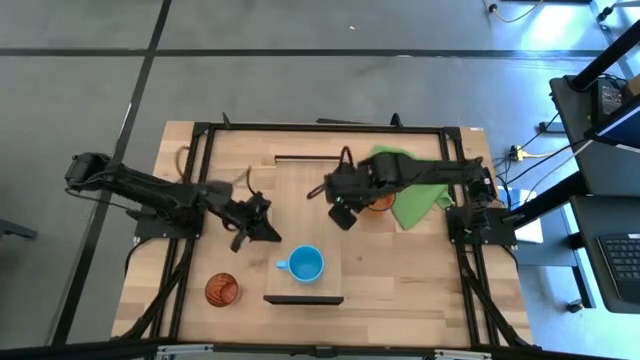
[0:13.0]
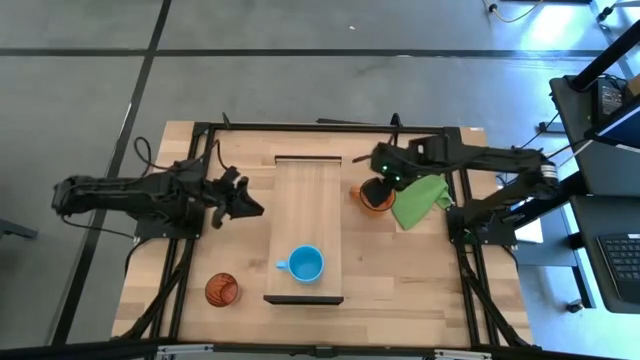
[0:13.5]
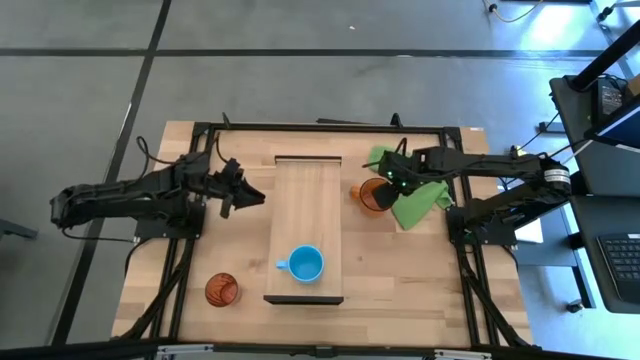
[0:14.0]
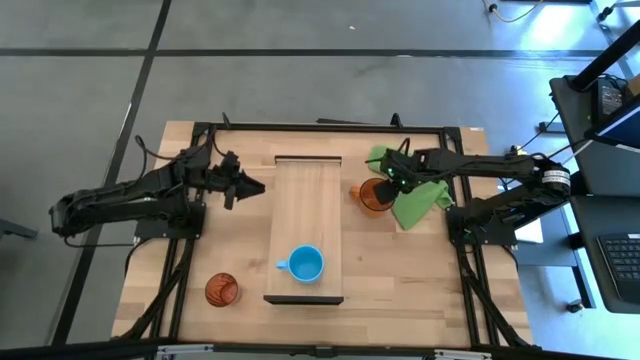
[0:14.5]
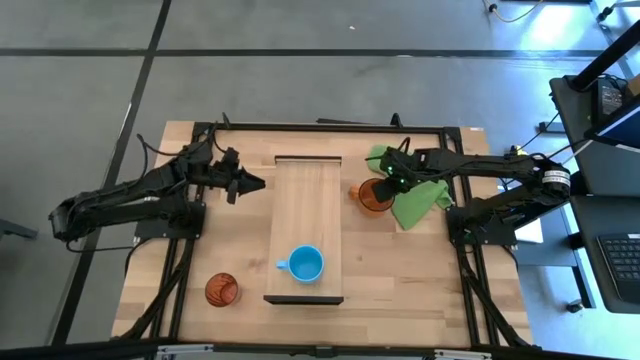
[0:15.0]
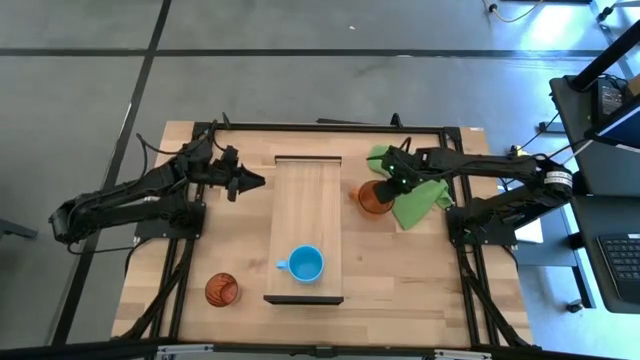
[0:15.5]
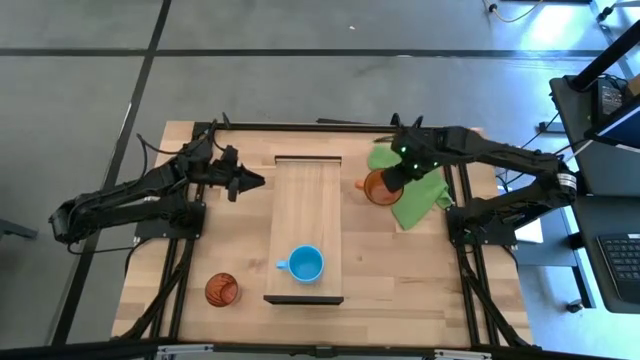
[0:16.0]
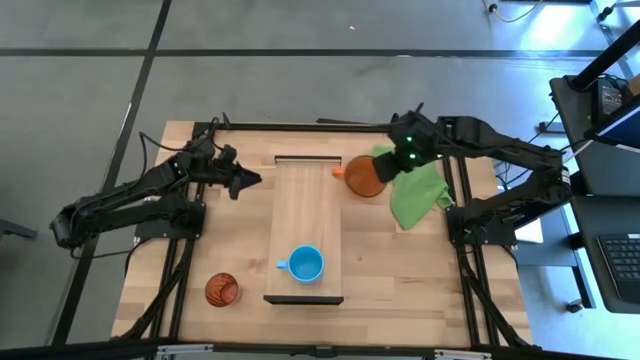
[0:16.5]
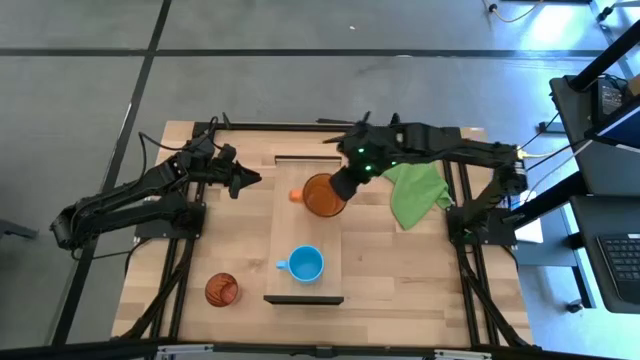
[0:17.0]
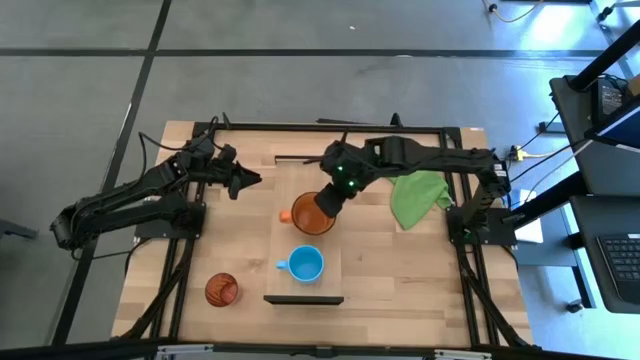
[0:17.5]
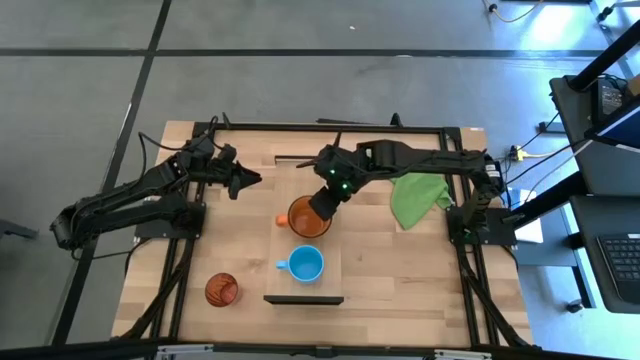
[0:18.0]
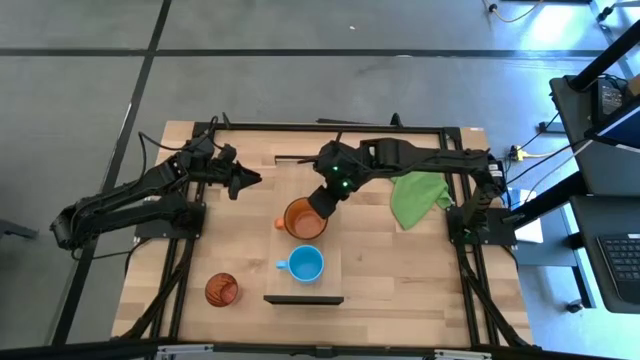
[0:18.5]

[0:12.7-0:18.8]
Task: Stack small to large cups/mugs on shelf
Put the orange mug on the shelf

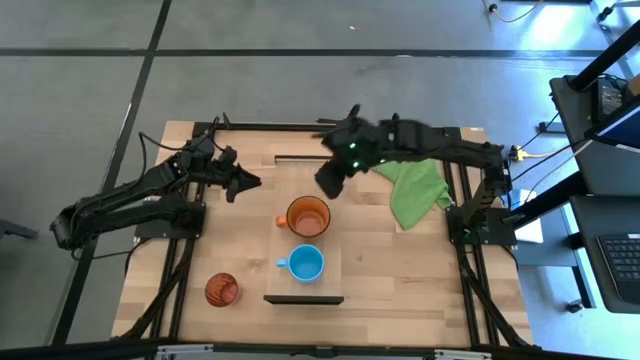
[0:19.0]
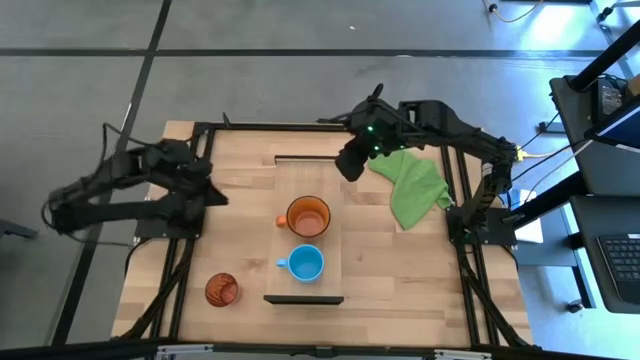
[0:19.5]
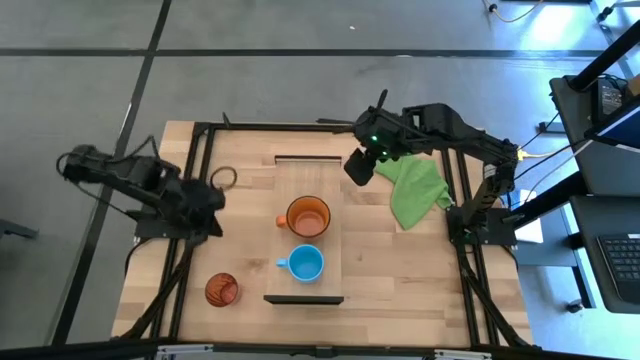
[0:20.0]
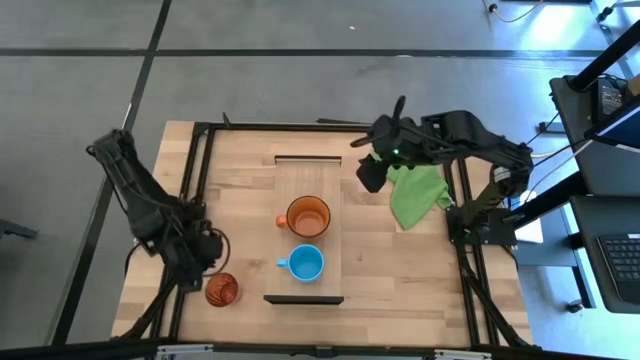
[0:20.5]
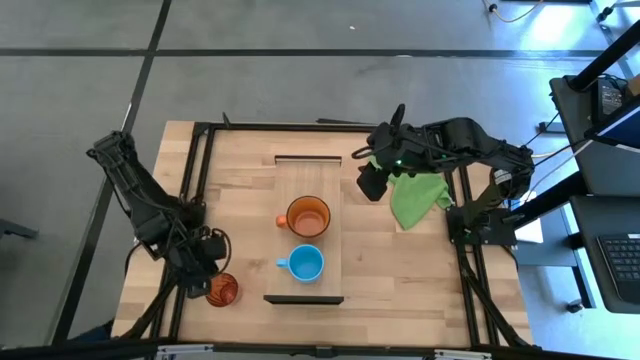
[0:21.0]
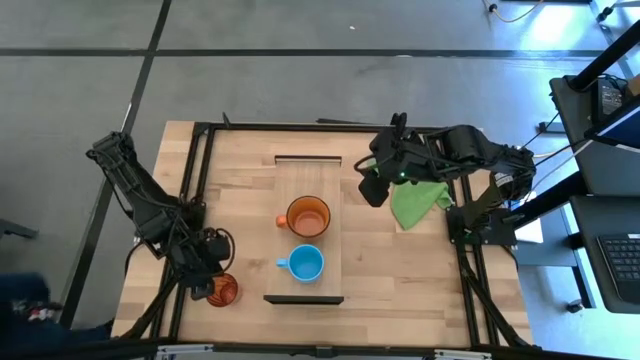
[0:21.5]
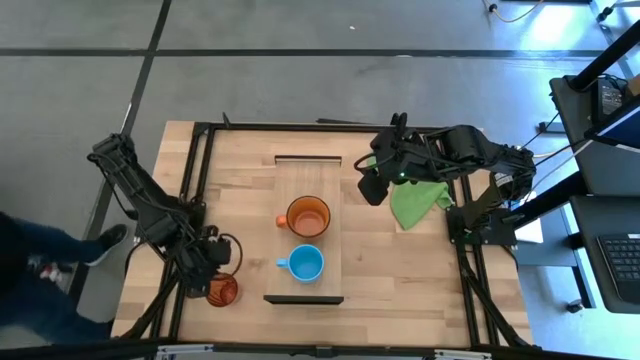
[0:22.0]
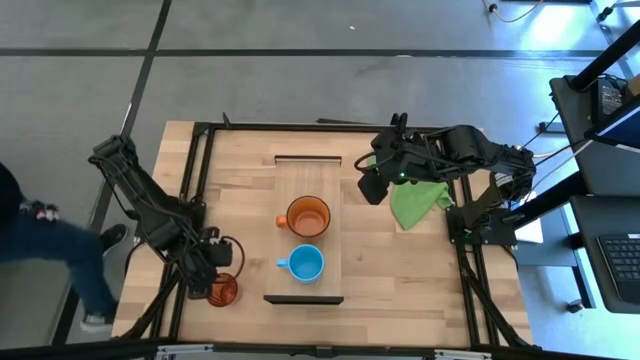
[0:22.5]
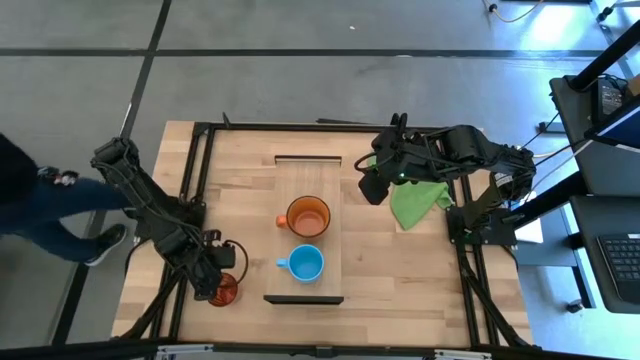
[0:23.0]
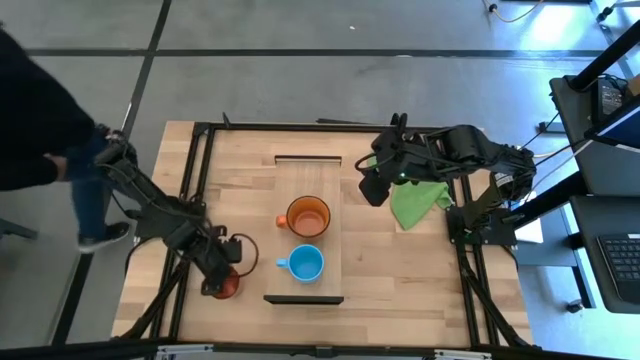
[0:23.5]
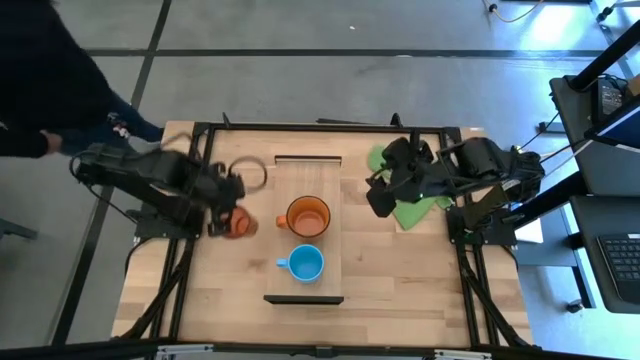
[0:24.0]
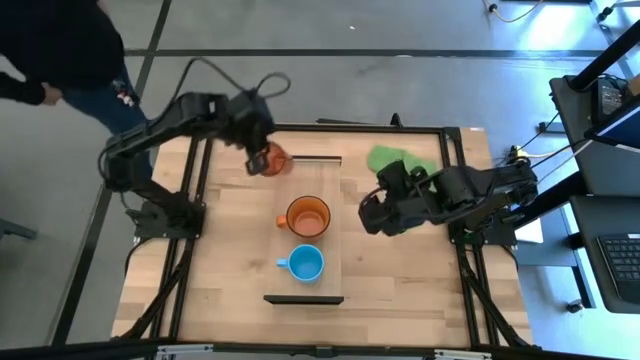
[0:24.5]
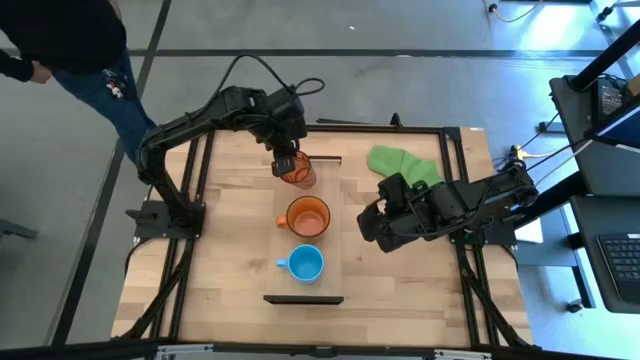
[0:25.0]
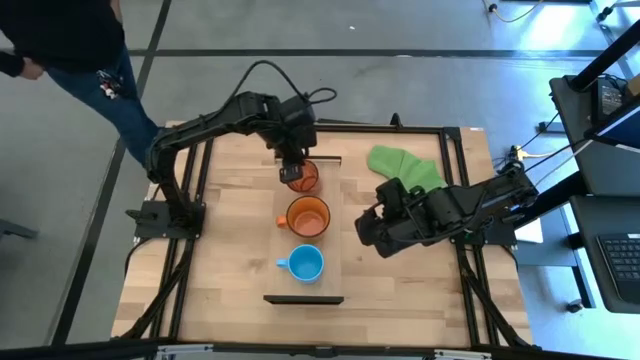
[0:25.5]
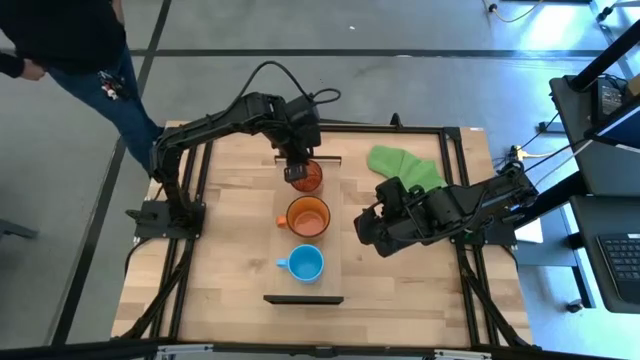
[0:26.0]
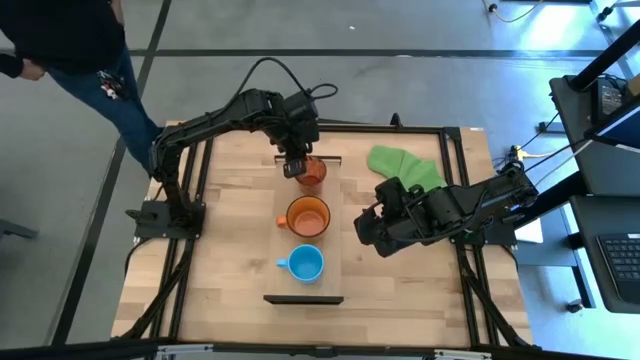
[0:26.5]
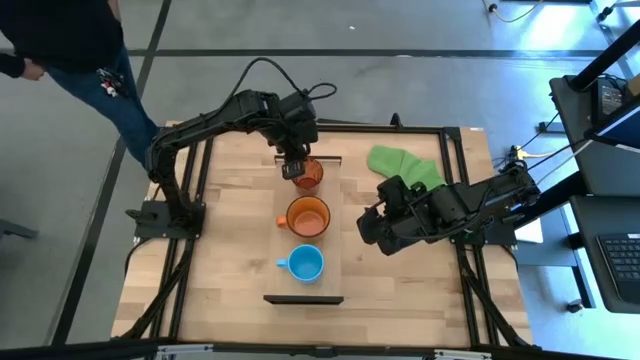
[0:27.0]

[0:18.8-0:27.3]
Put the orange cup on the shelf

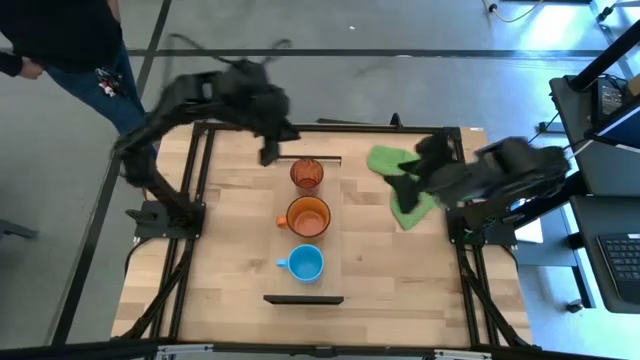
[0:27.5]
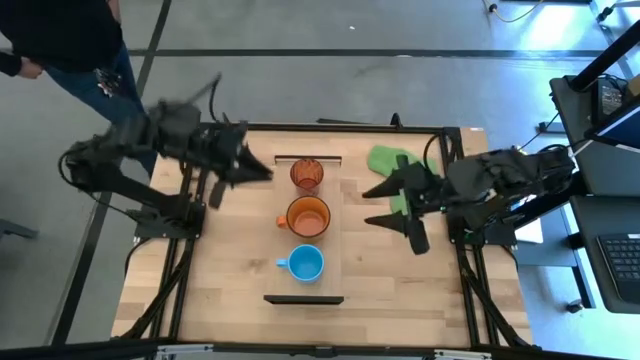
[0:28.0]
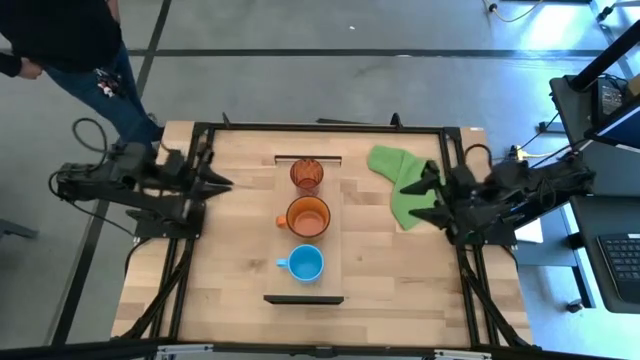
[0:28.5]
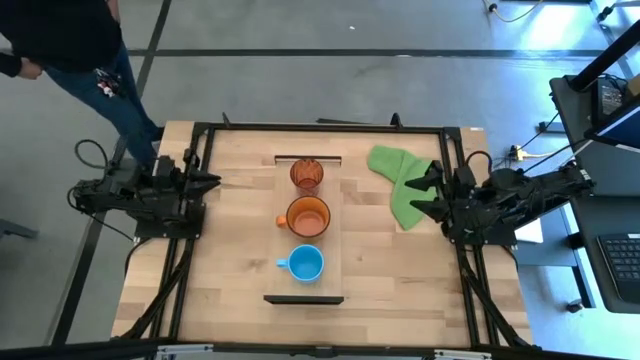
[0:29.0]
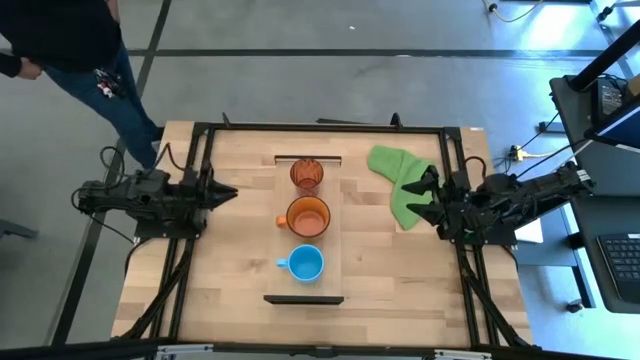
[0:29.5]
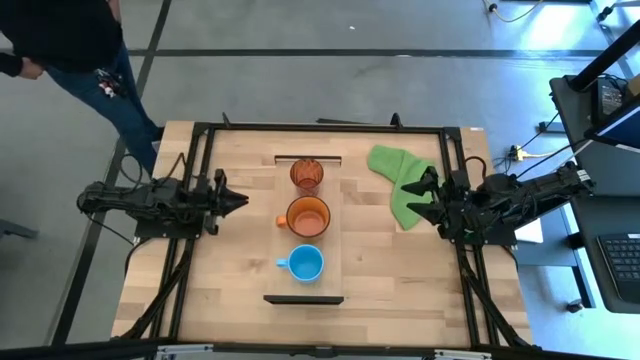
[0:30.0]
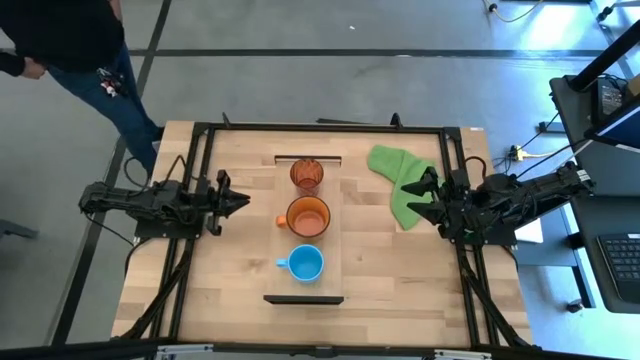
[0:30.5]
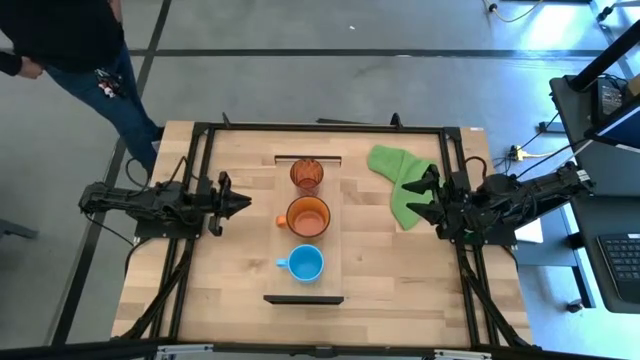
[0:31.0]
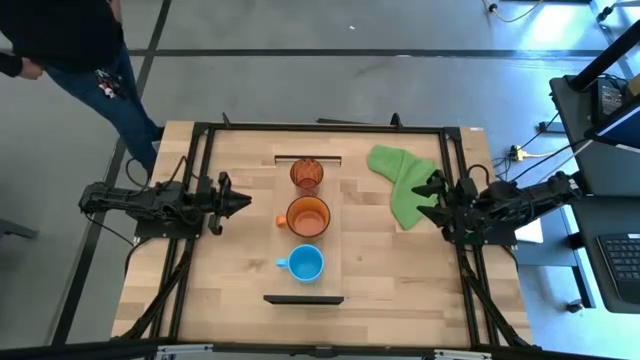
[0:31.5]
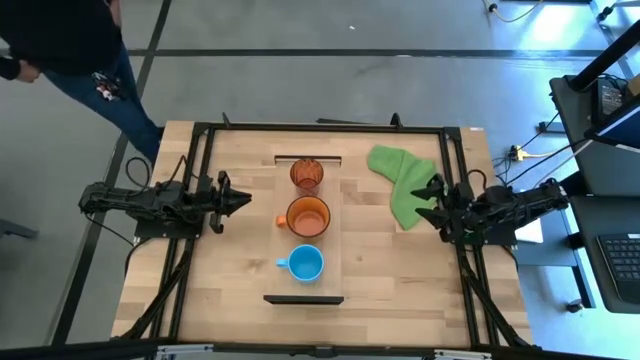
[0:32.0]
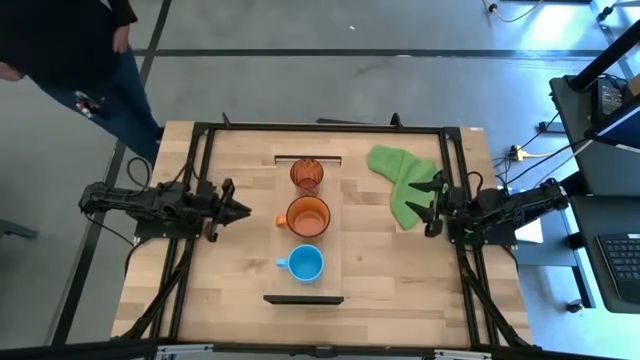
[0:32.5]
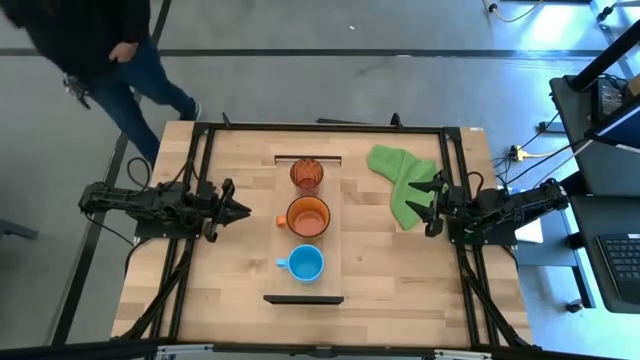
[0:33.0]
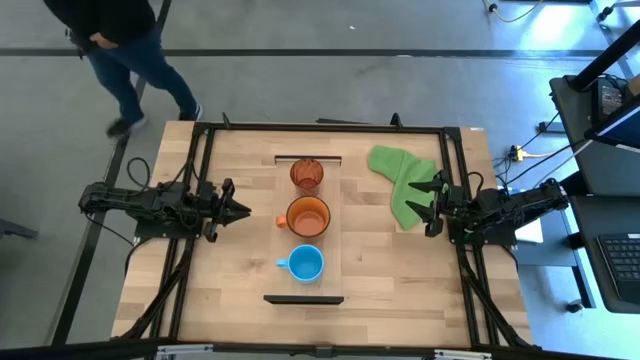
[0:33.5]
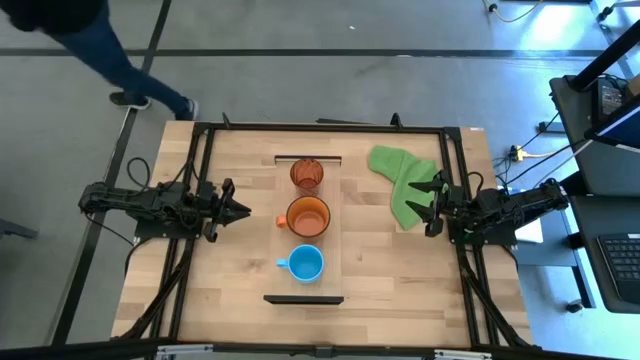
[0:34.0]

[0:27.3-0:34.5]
Return to Home Position
